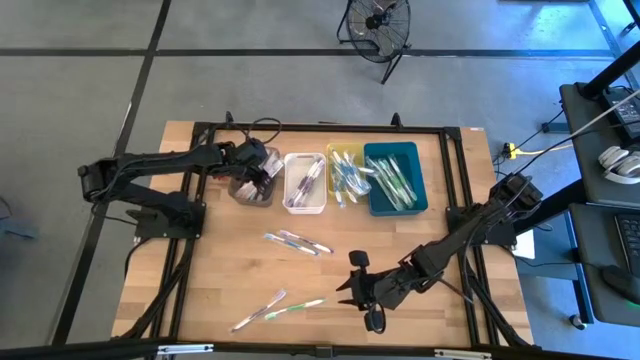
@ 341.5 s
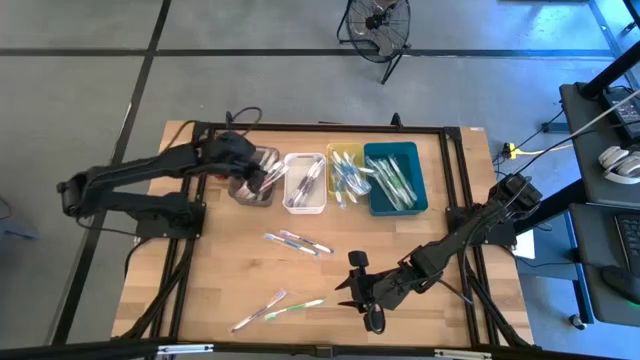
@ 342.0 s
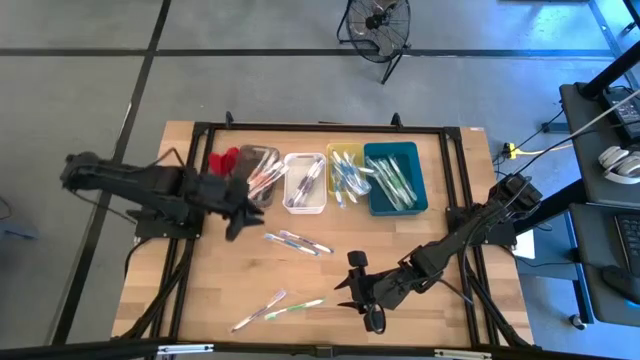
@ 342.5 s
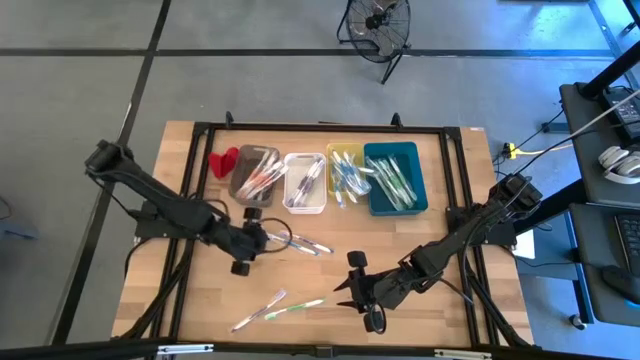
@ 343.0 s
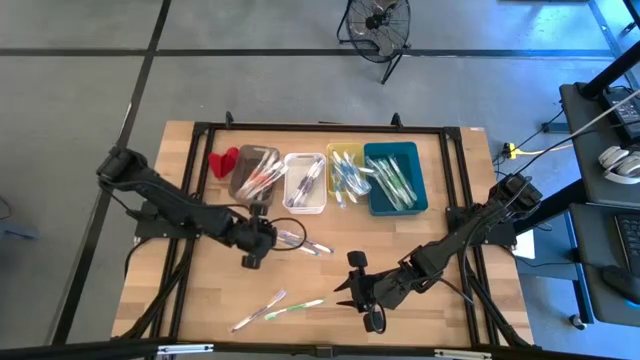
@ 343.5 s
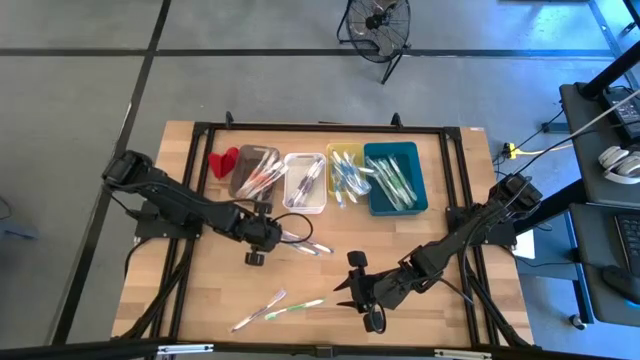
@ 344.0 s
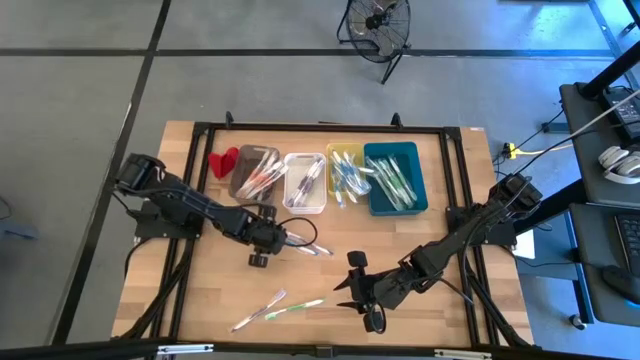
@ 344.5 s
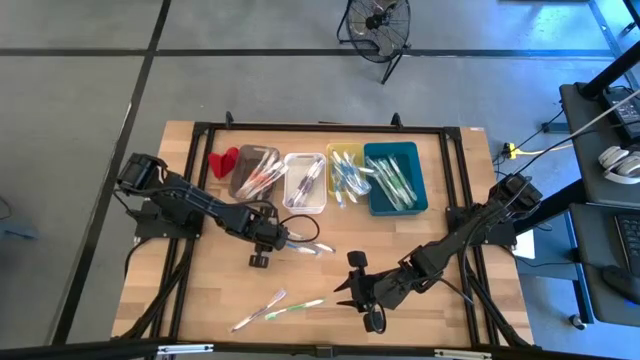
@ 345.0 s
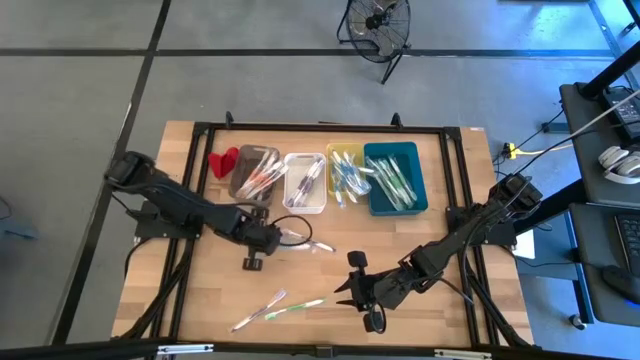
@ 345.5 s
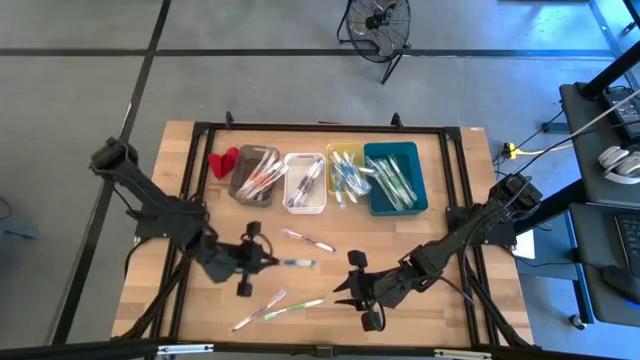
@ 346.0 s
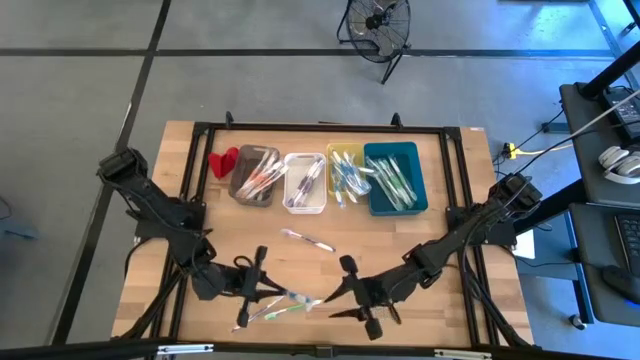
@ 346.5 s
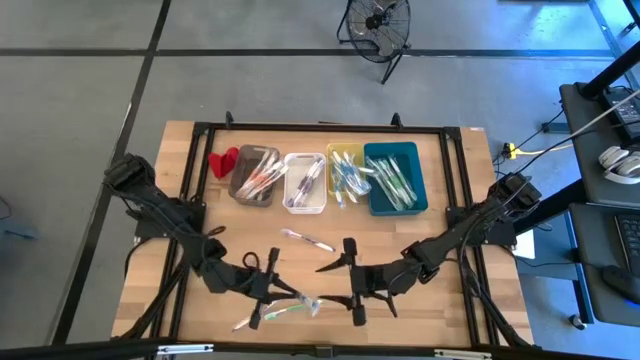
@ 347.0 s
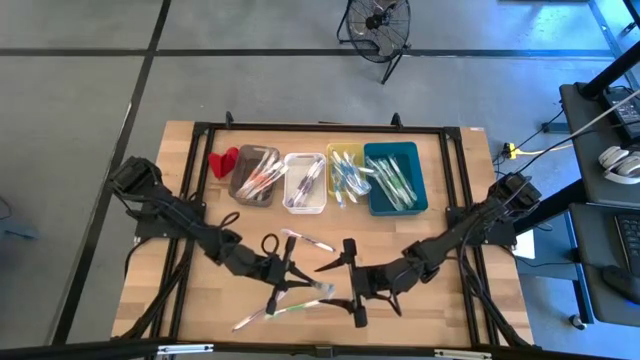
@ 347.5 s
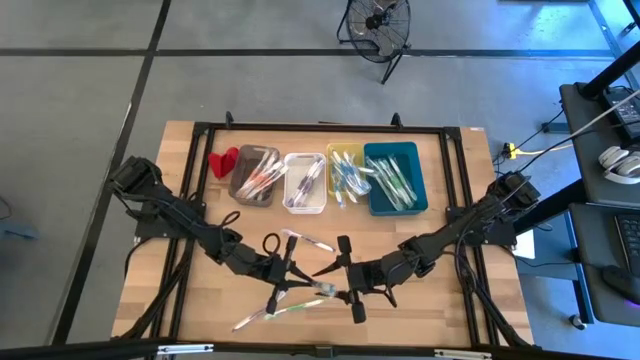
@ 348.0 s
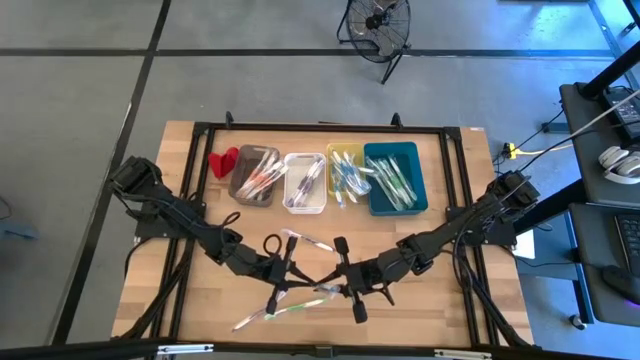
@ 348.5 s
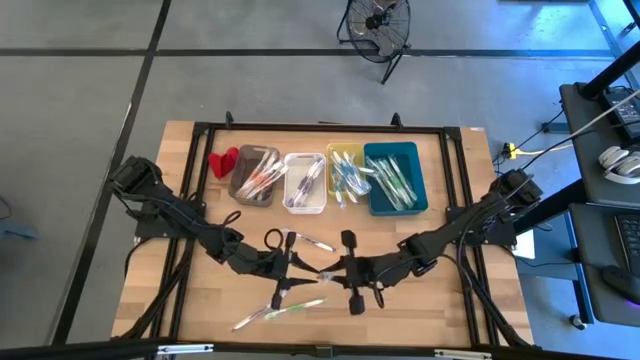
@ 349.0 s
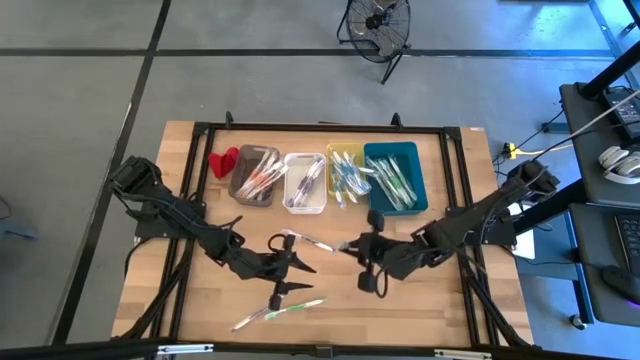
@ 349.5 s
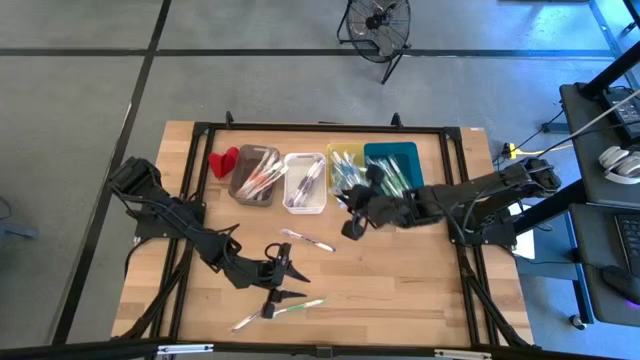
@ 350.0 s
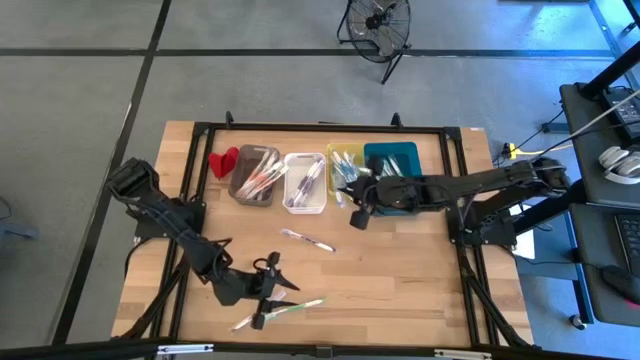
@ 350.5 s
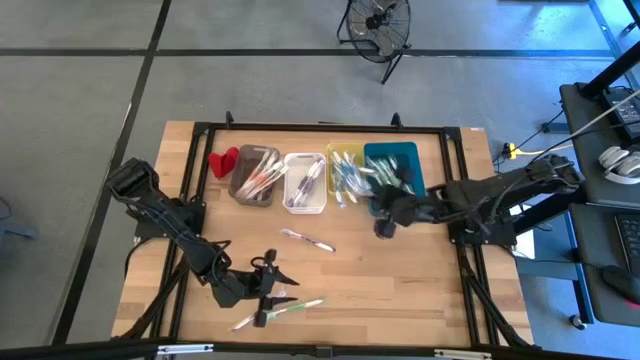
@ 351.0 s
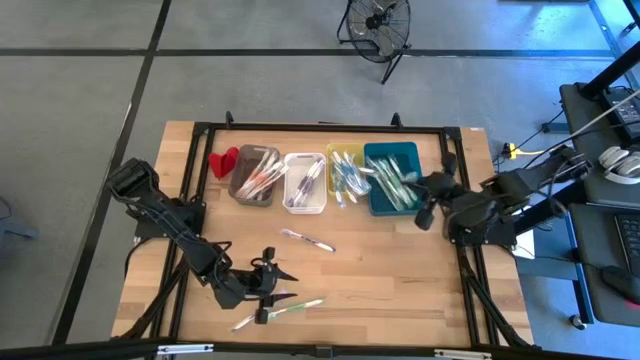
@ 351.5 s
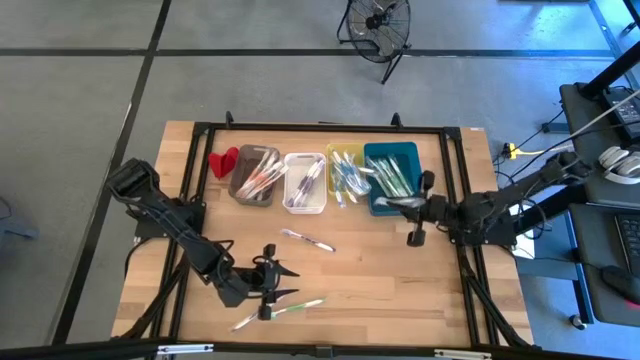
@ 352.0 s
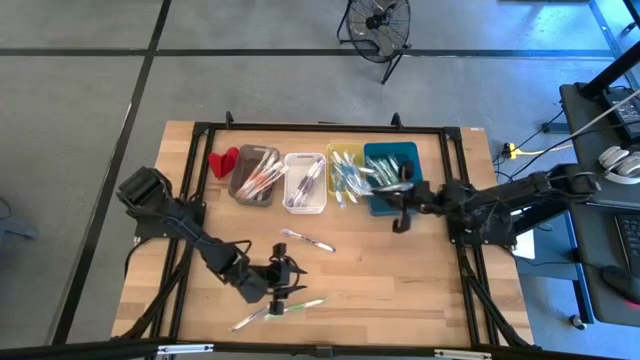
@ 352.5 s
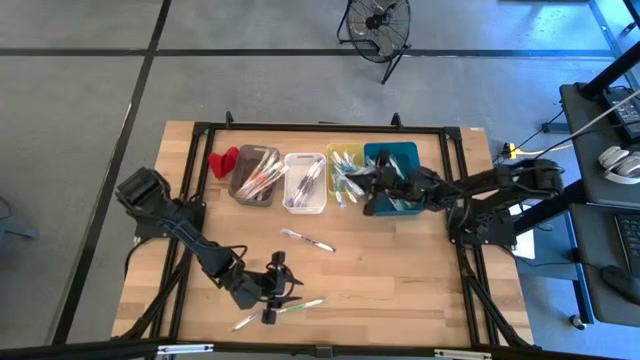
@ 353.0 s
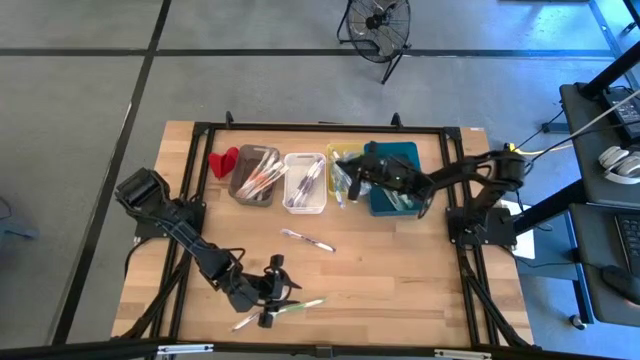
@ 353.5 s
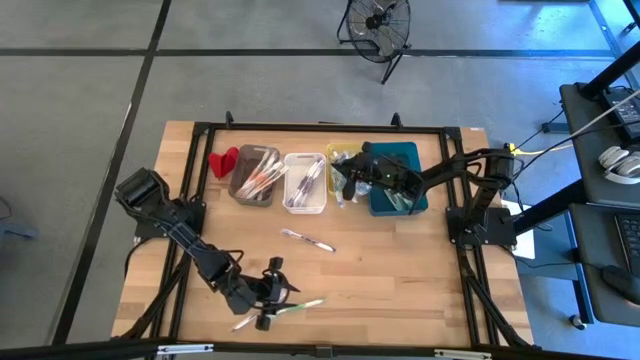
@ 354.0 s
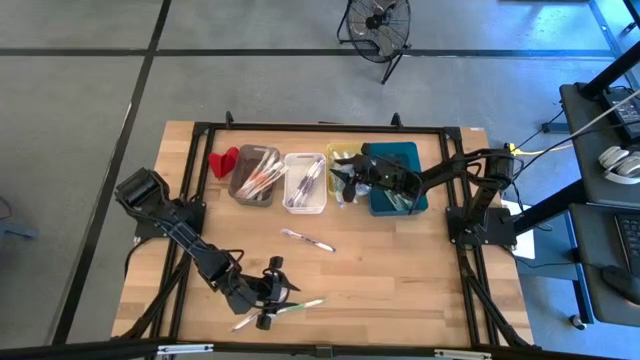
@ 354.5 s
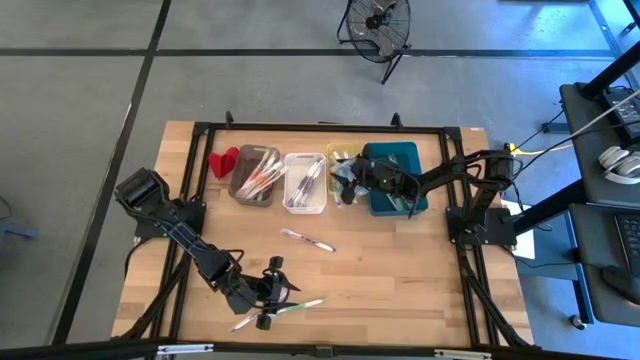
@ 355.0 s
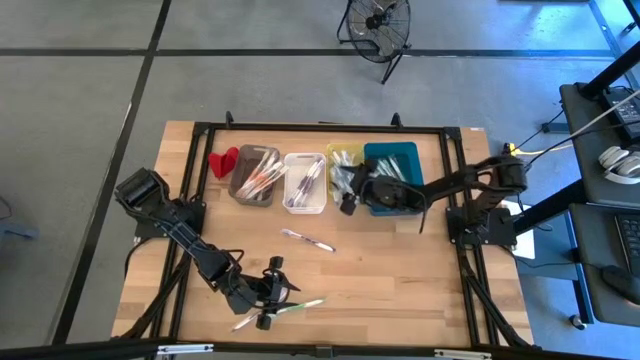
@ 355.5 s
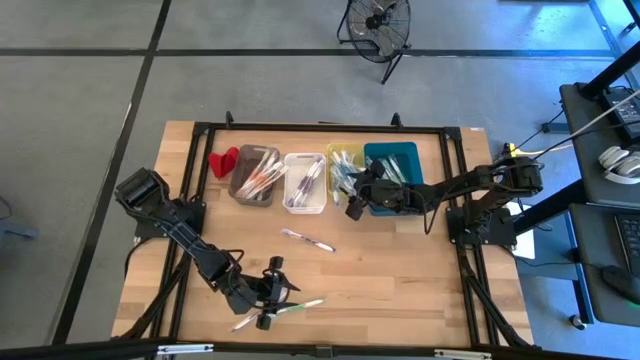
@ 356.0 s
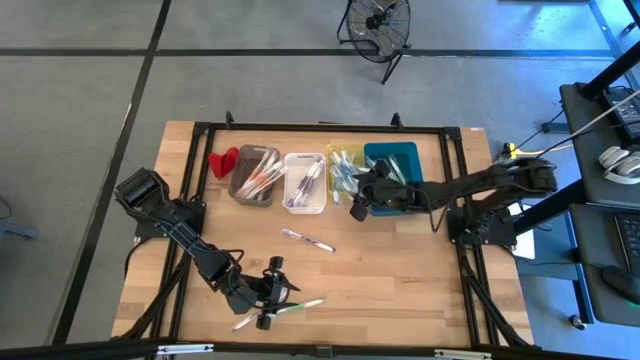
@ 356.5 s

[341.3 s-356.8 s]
Task: Pick & Place Toothbrushes
Put the blue toothbrush into the yellow bin

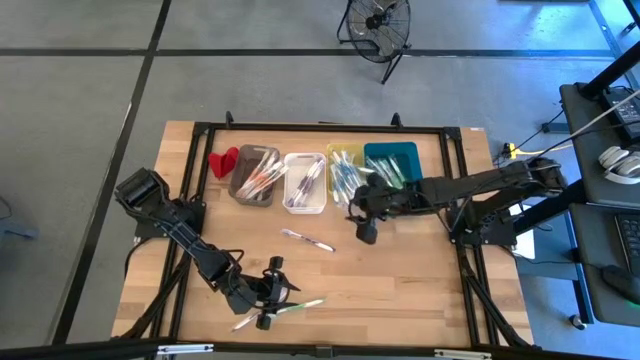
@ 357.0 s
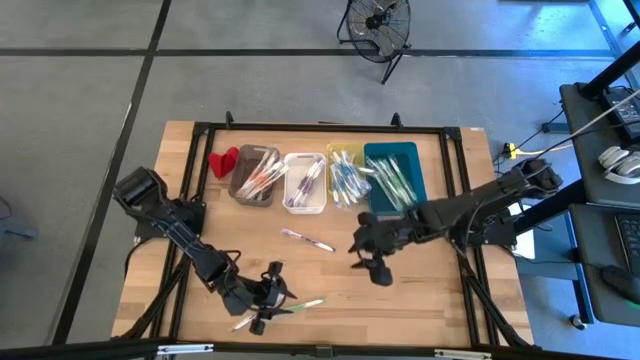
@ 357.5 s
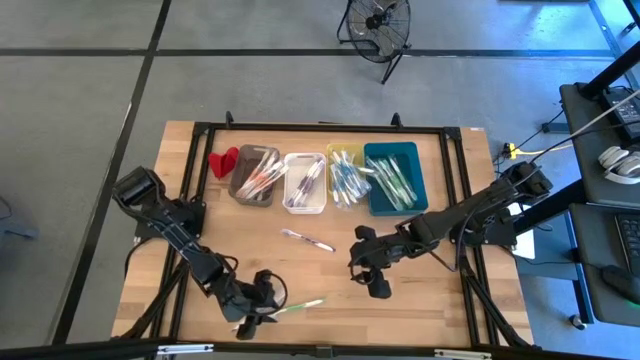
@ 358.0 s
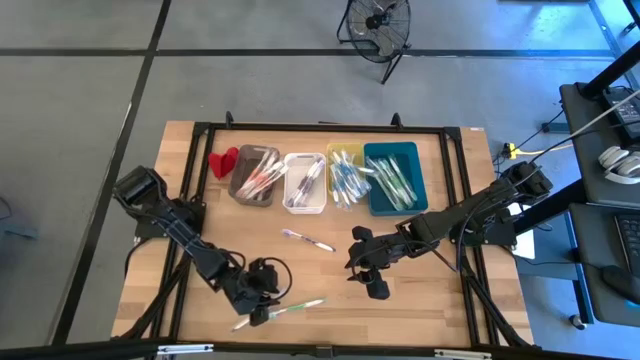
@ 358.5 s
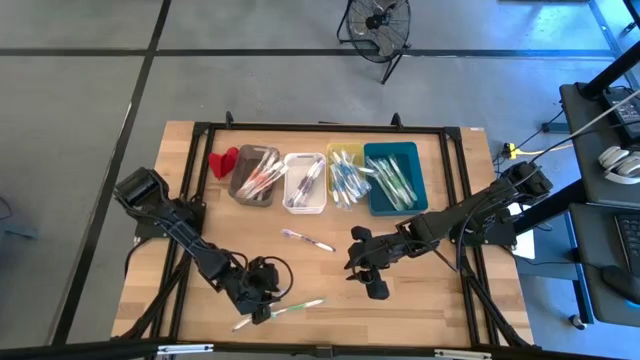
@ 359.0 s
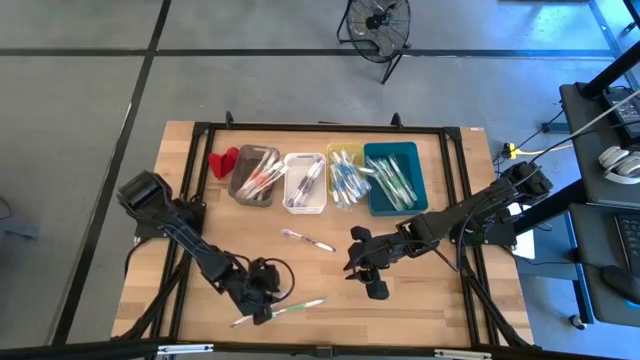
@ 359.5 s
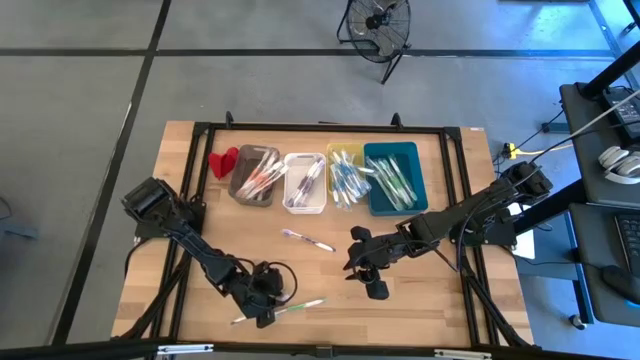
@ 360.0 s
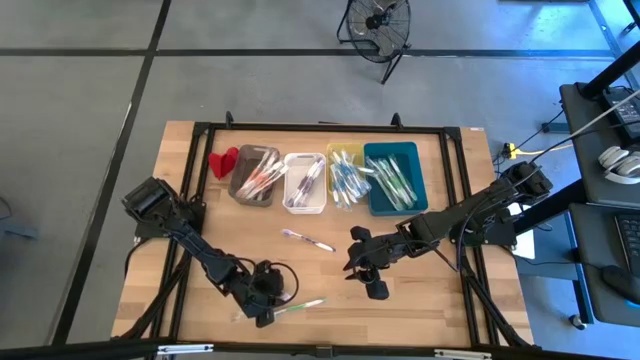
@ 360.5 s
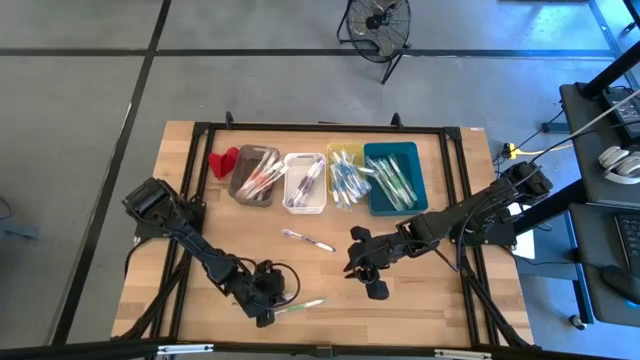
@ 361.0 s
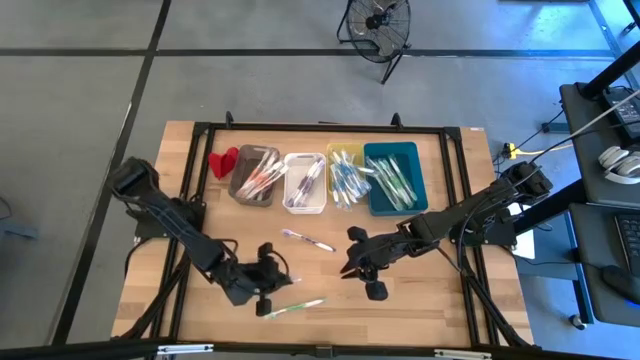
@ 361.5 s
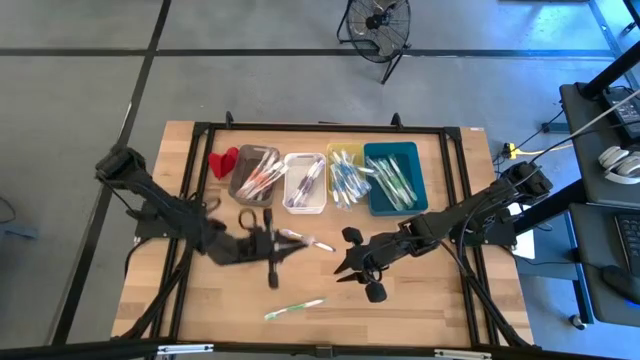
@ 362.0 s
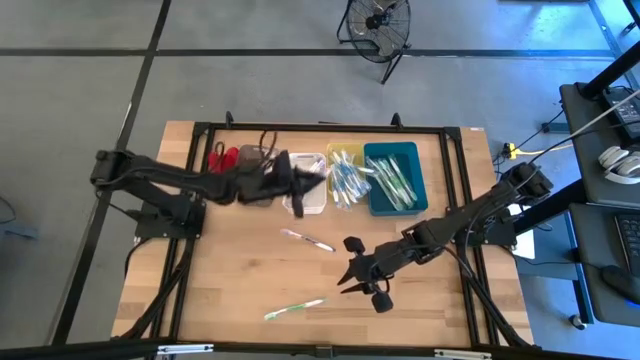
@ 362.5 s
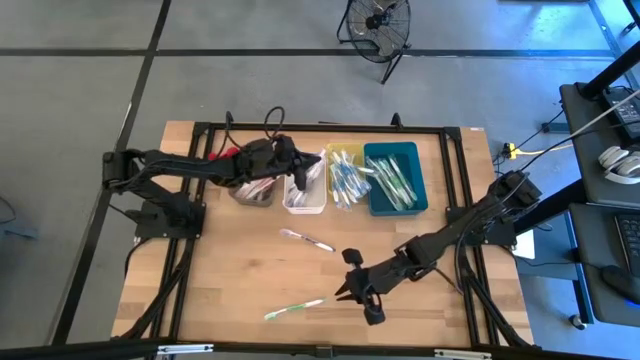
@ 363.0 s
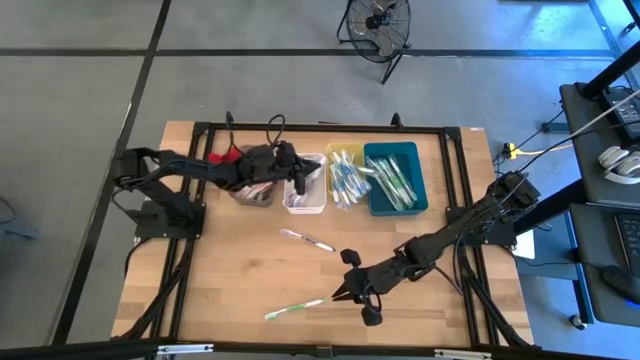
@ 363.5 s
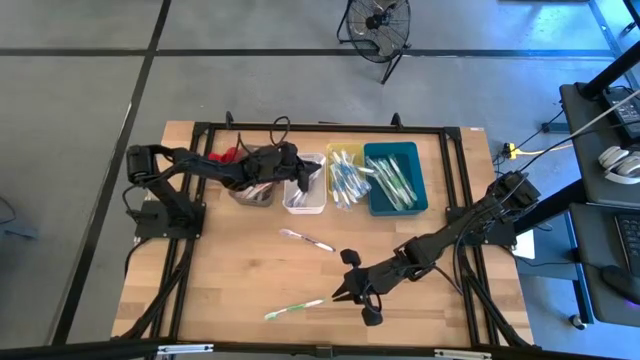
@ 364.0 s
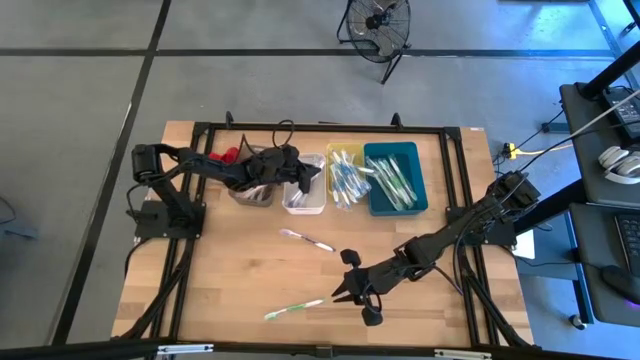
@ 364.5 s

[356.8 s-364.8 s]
Put the bottom purple toothbrush into the white bin
